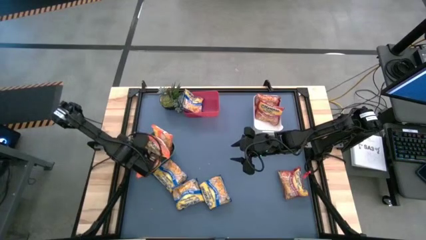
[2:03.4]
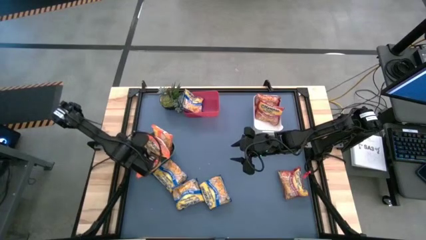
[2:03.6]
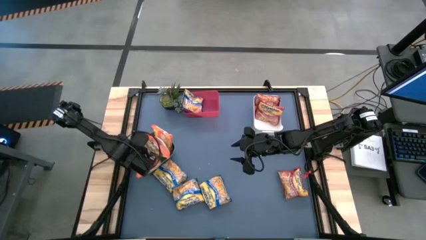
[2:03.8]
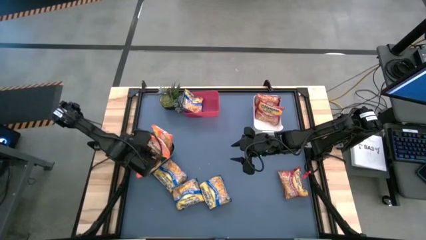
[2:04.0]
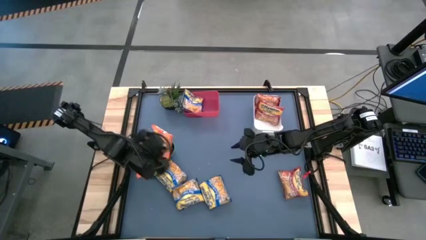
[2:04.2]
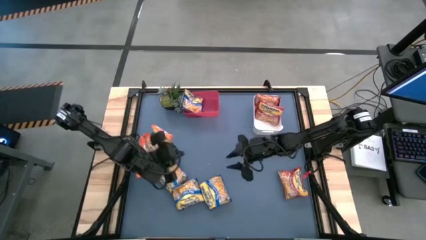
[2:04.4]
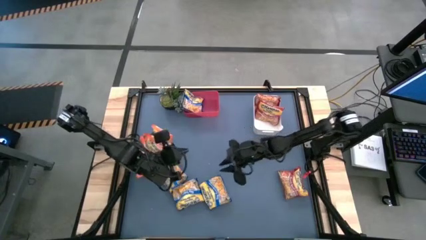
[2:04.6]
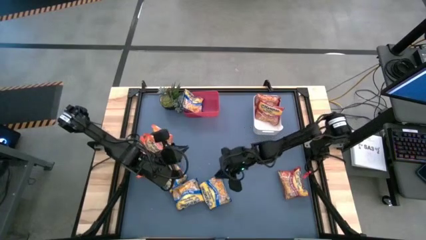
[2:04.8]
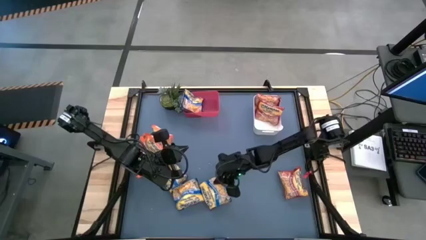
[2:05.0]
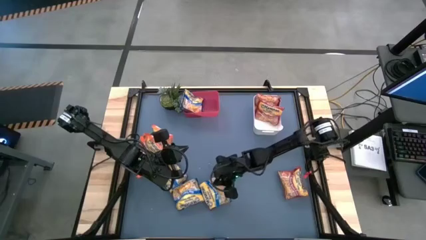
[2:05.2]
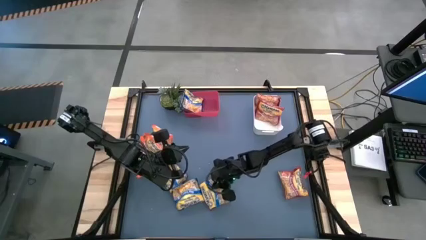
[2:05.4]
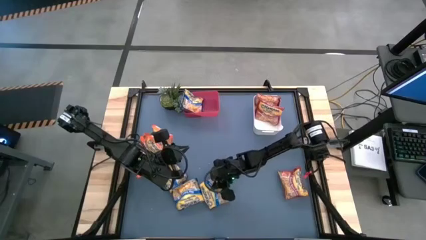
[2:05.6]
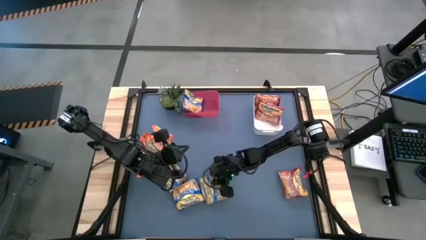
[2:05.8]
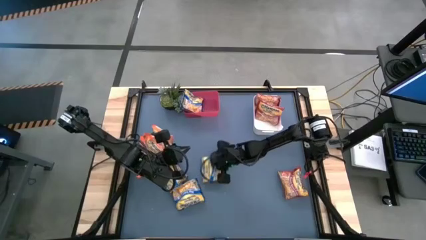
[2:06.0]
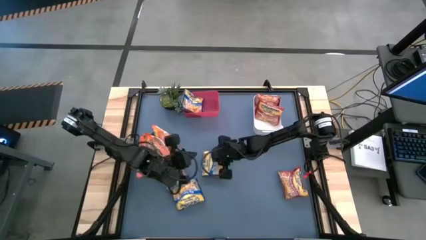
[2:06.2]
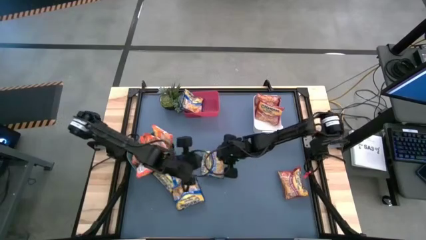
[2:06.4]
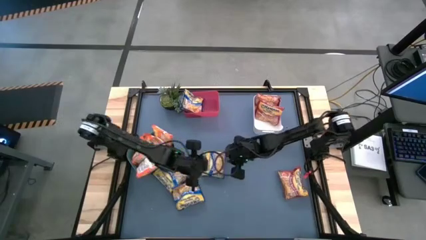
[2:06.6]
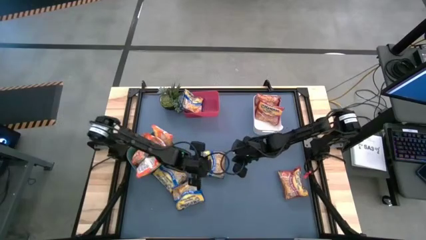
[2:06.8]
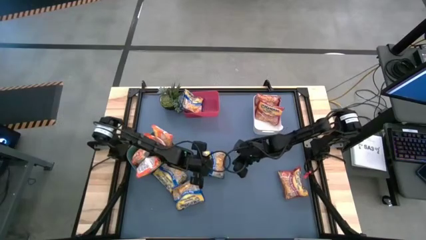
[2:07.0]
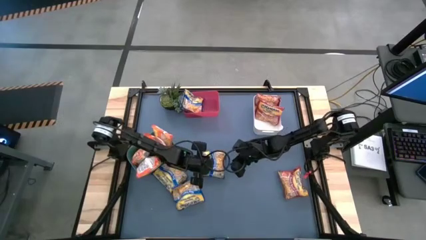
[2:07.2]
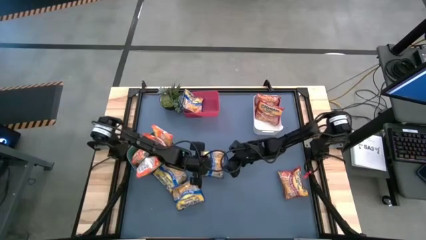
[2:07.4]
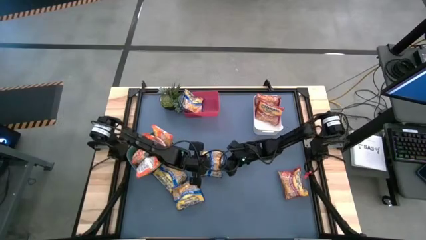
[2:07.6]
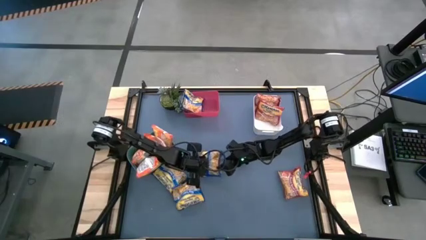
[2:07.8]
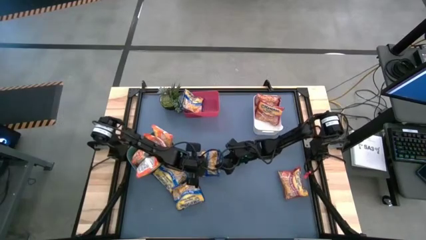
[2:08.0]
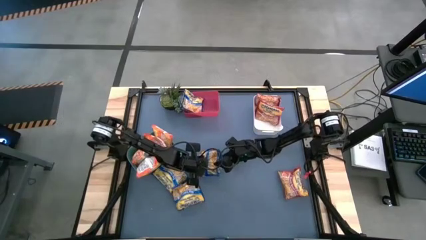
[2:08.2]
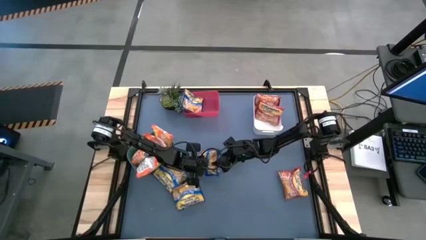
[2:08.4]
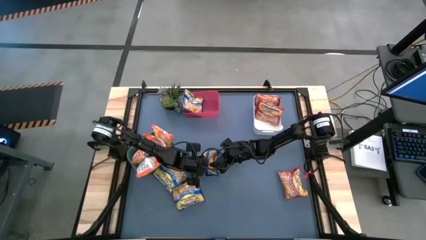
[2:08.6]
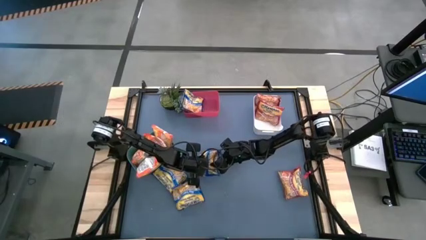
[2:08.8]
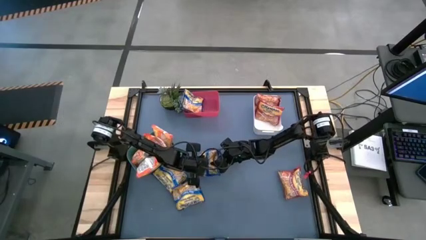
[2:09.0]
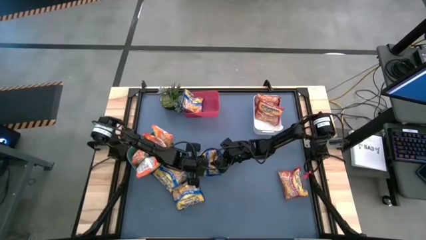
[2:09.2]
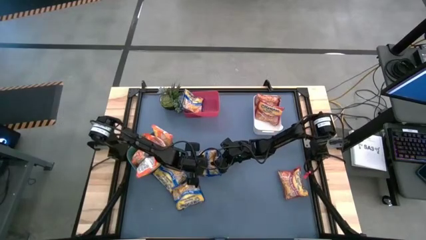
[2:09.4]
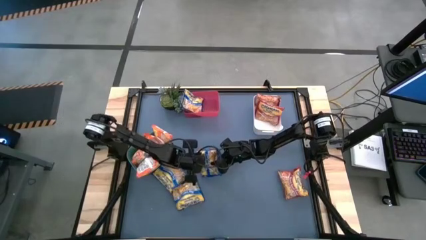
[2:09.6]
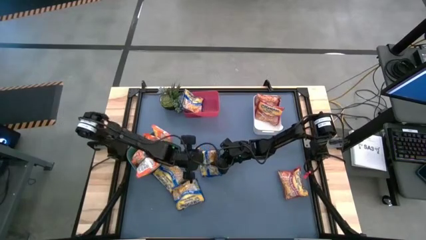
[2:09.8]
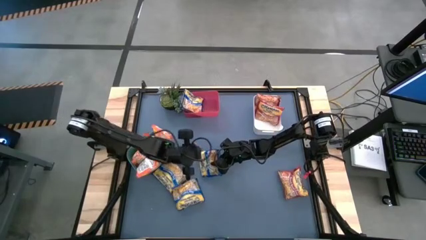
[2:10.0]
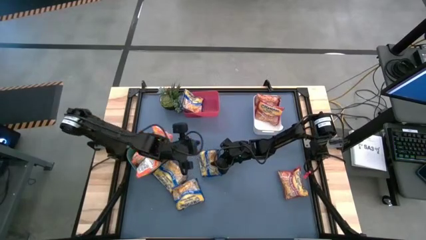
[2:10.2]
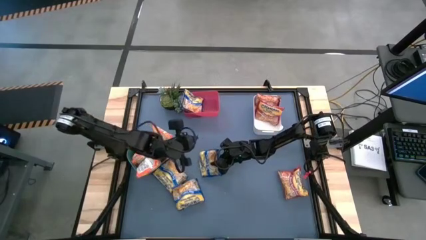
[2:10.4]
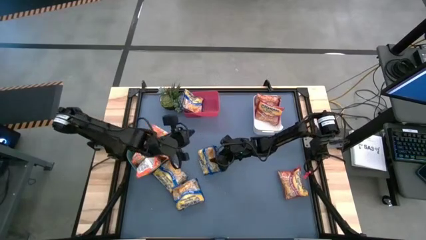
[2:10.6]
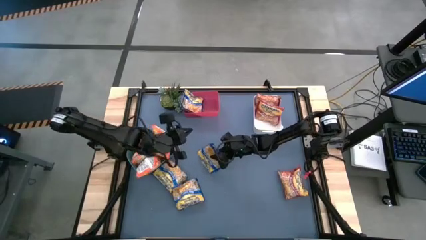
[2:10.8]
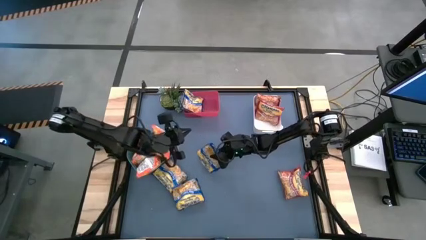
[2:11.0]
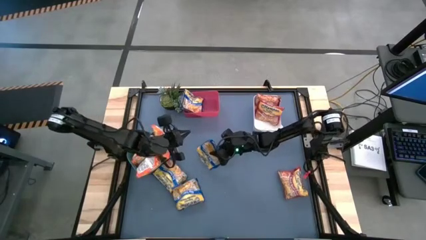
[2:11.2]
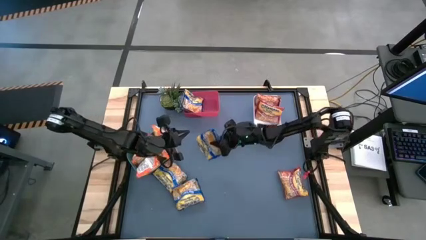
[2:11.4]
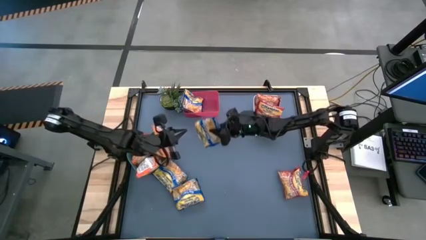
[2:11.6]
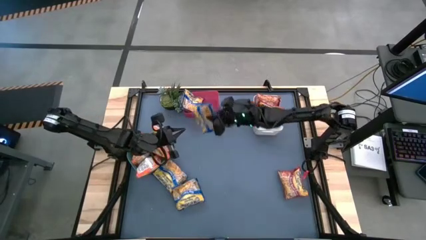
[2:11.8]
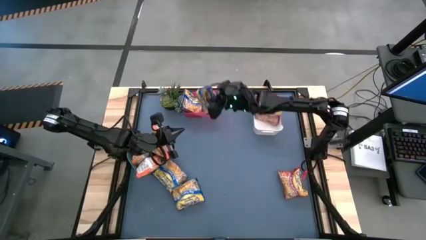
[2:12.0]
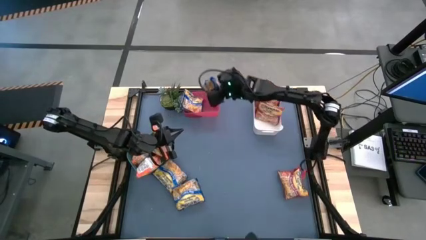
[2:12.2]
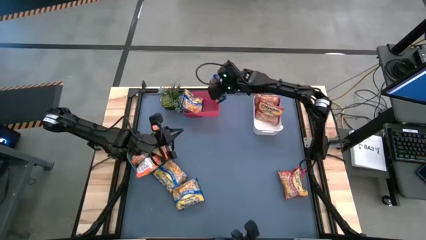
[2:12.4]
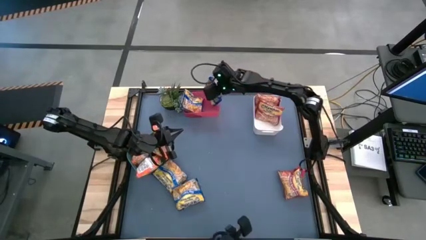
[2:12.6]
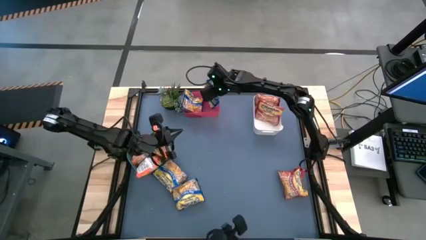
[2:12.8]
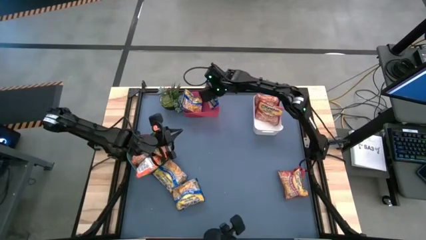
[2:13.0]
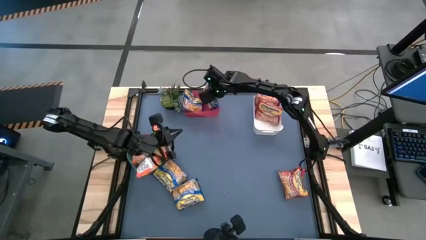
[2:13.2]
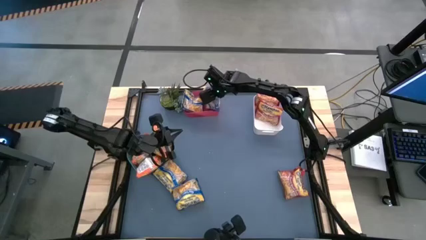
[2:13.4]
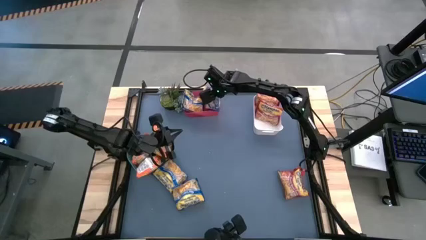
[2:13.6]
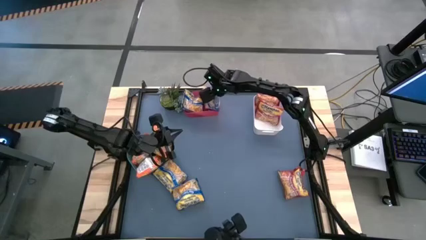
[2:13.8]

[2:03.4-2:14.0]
Task: Sort Maruchan noodles
Put the blue noodle pack into the red bin

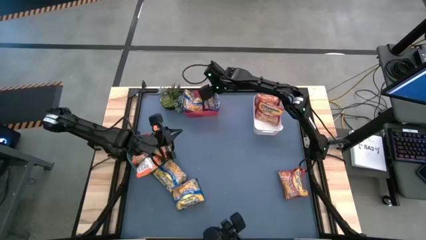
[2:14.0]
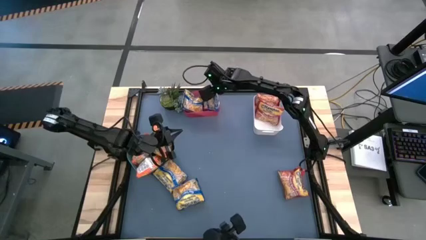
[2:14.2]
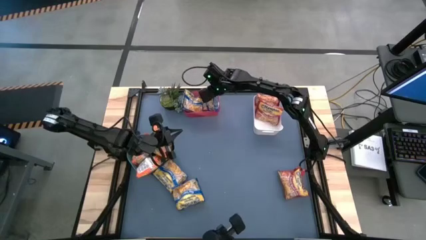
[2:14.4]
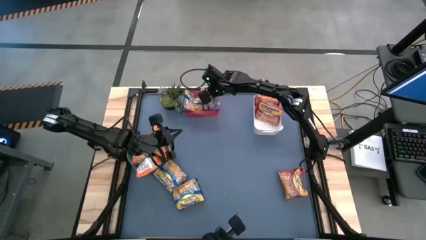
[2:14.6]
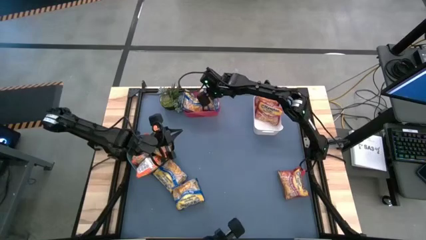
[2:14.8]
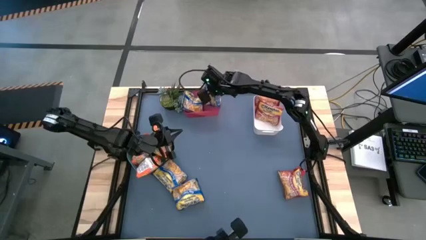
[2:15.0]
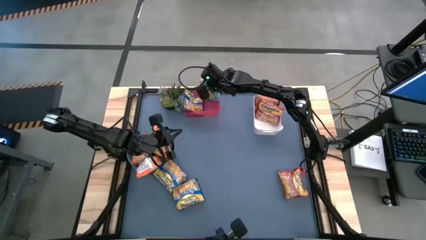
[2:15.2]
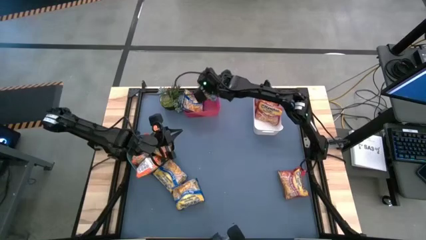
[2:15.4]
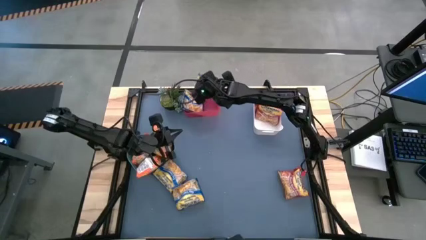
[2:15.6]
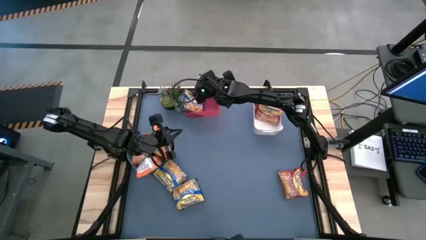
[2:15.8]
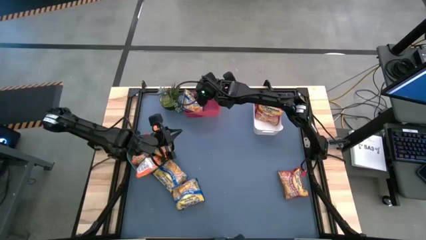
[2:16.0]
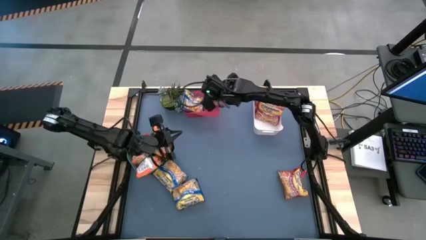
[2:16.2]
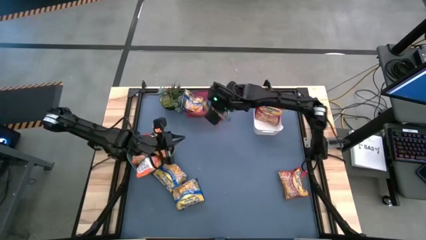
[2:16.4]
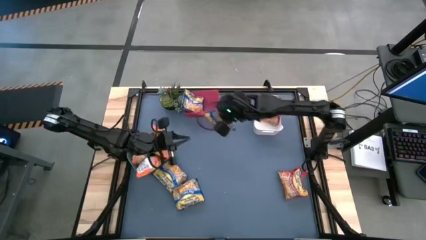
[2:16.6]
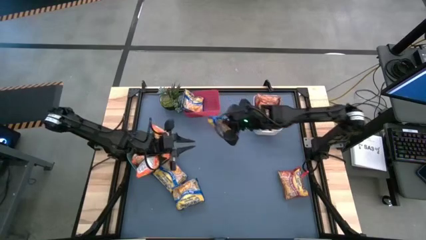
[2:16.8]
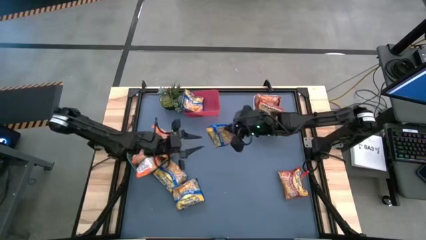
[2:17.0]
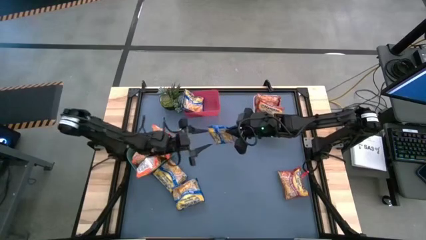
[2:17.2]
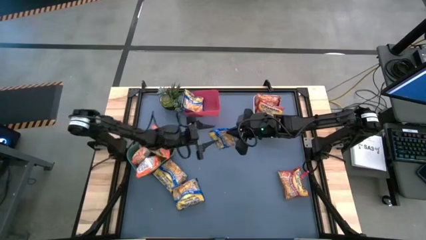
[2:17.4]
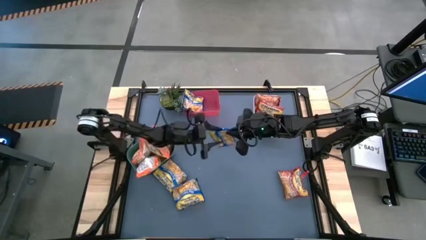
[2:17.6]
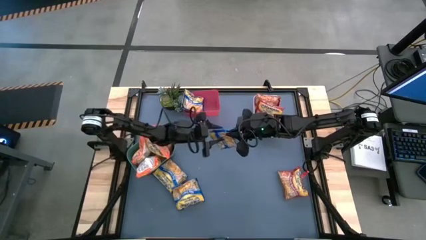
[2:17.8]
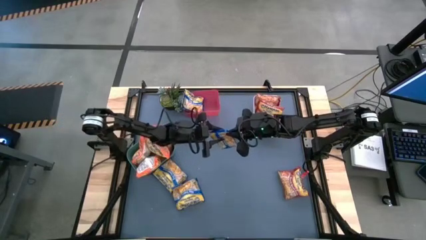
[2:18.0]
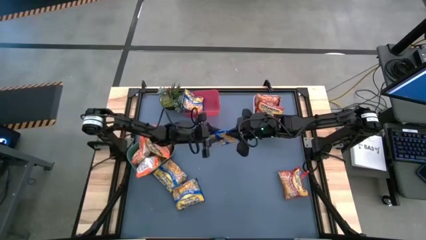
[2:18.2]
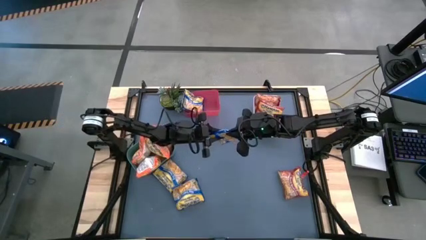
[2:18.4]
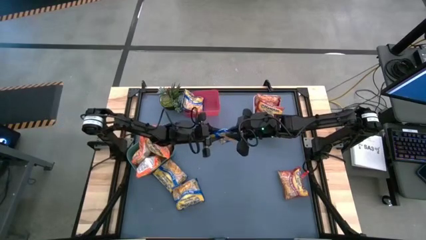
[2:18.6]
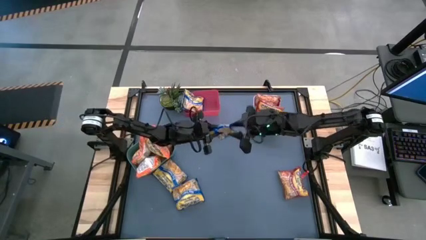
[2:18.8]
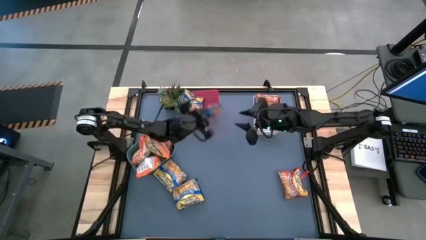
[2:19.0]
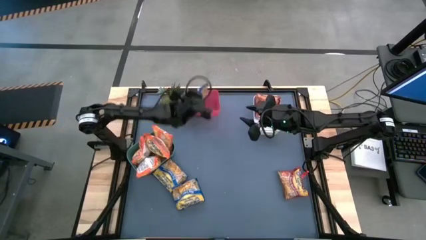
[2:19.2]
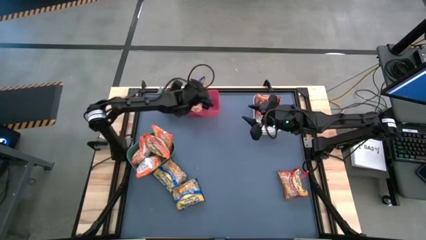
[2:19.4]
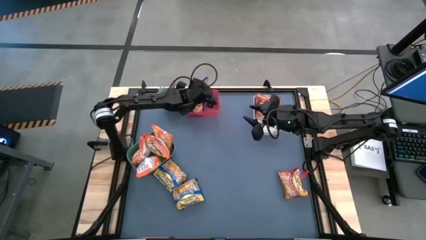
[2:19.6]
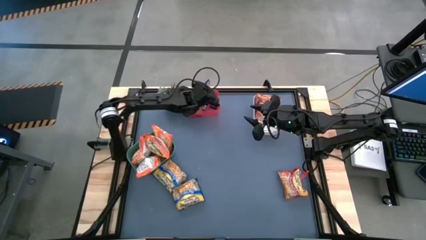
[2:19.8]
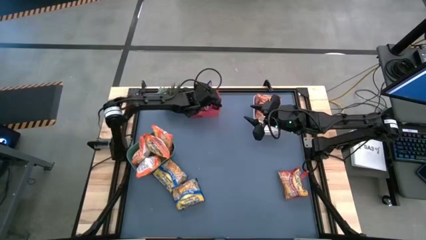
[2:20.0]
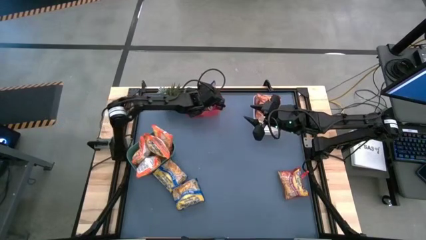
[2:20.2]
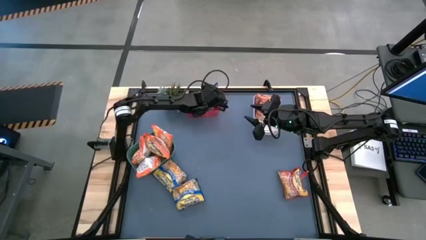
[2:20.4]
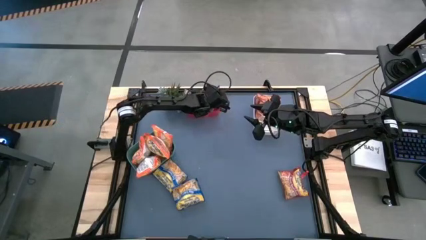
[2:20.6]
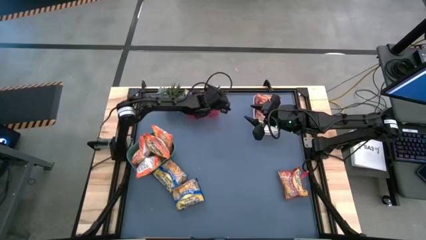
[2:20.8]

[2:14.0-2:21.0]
Put the blue noodle pack into the red bin
